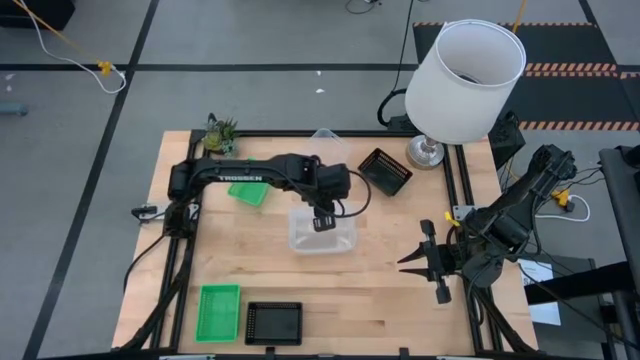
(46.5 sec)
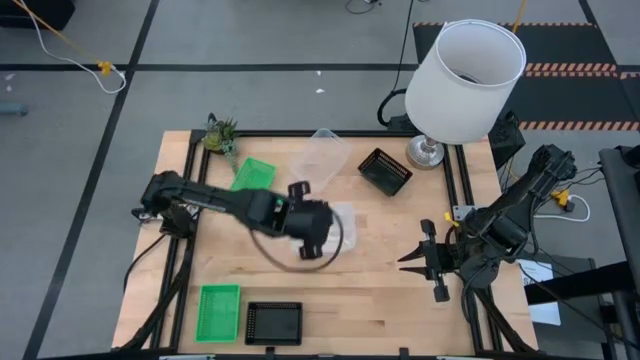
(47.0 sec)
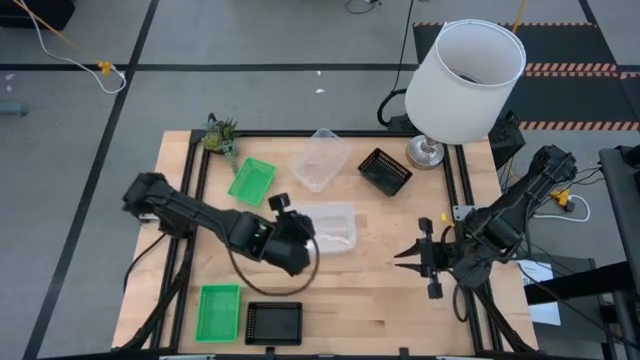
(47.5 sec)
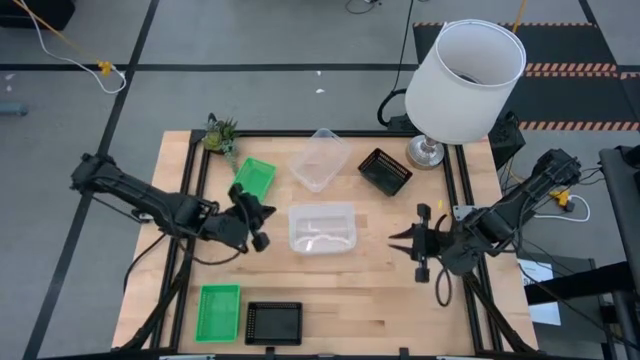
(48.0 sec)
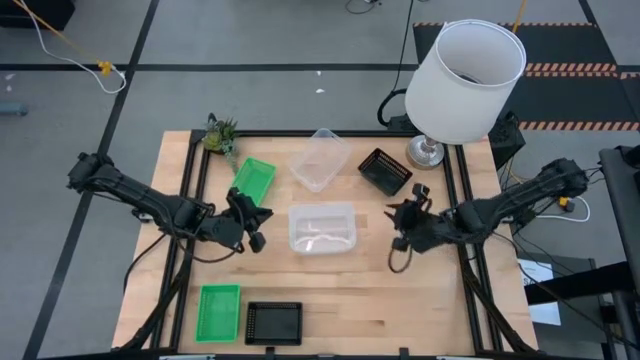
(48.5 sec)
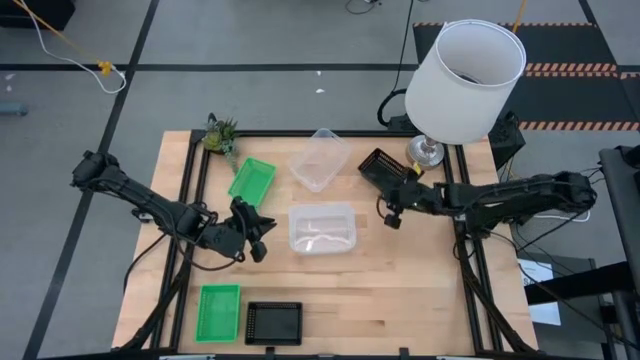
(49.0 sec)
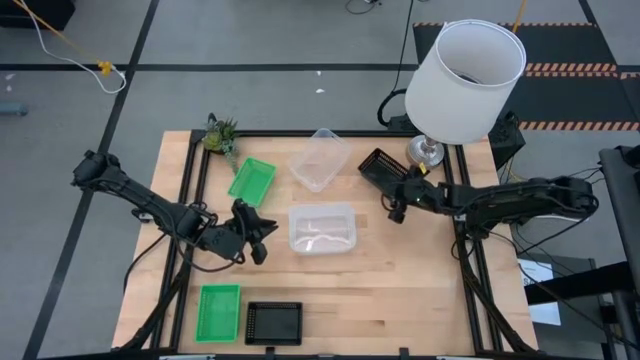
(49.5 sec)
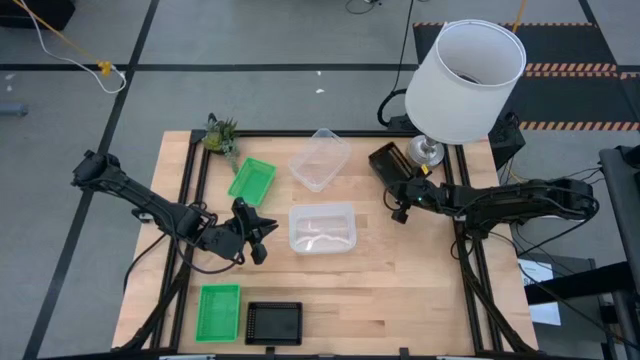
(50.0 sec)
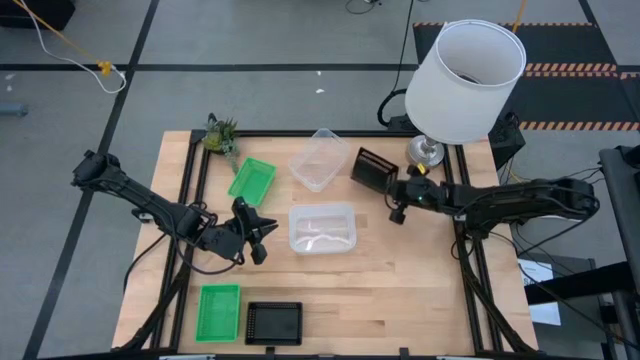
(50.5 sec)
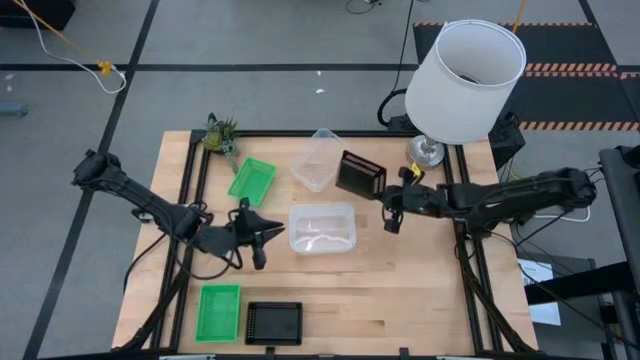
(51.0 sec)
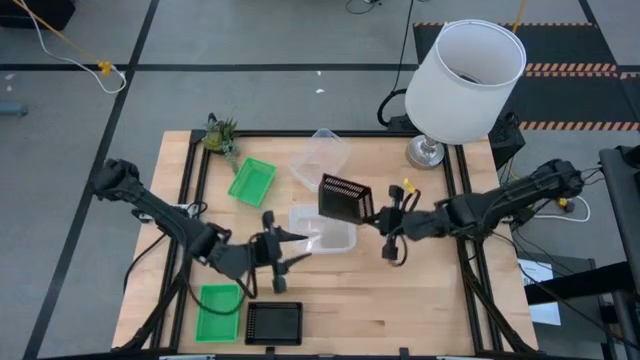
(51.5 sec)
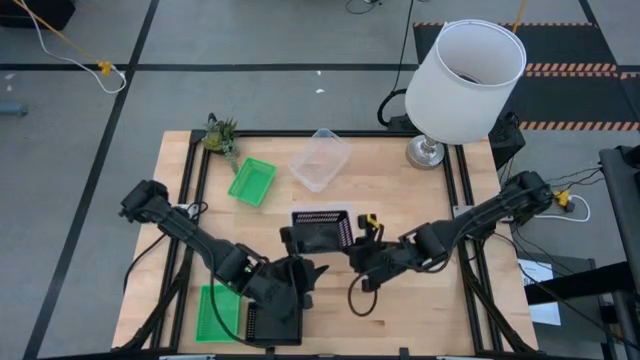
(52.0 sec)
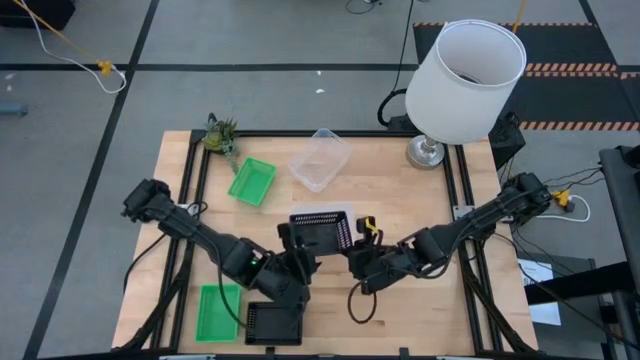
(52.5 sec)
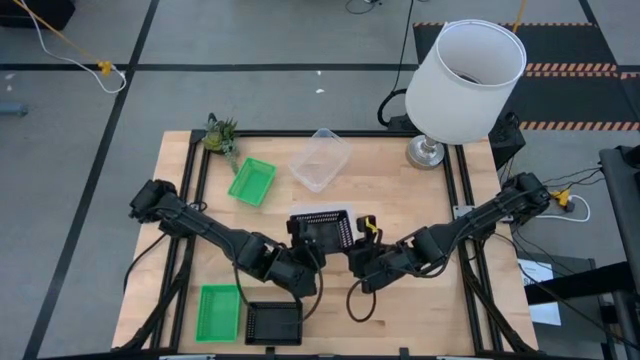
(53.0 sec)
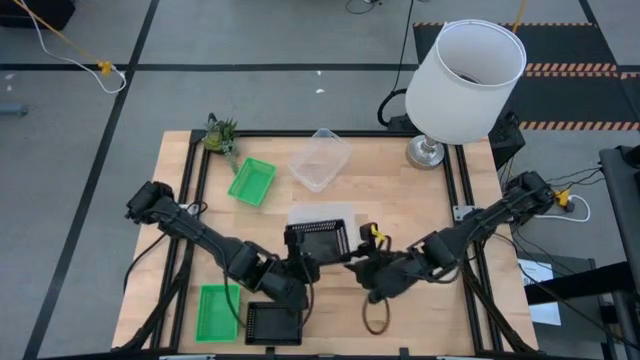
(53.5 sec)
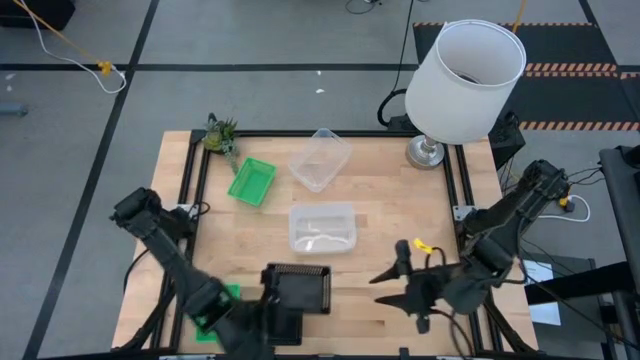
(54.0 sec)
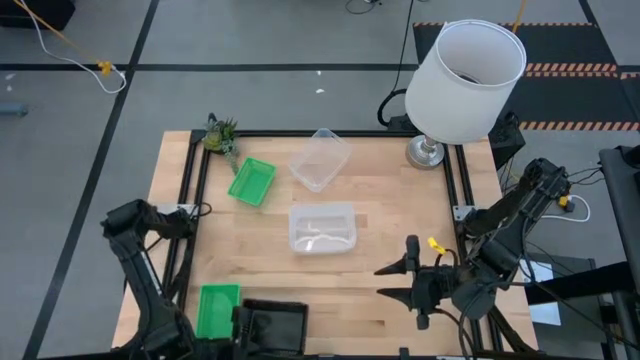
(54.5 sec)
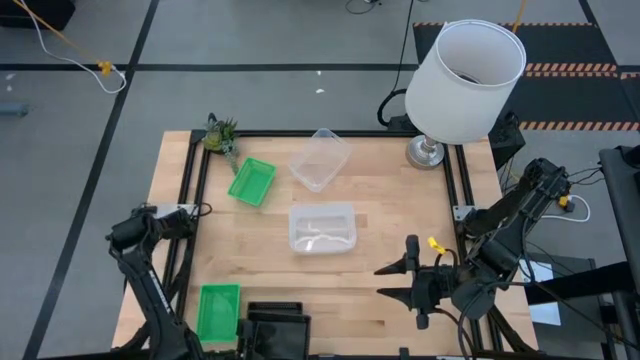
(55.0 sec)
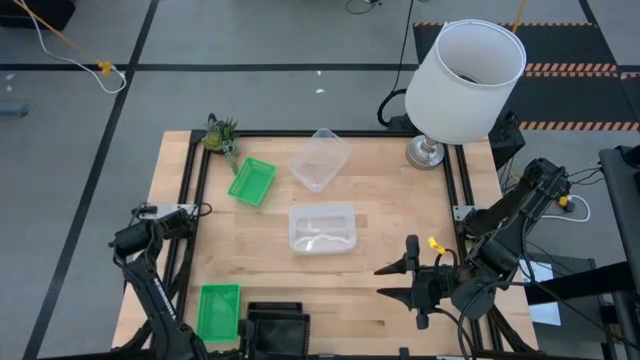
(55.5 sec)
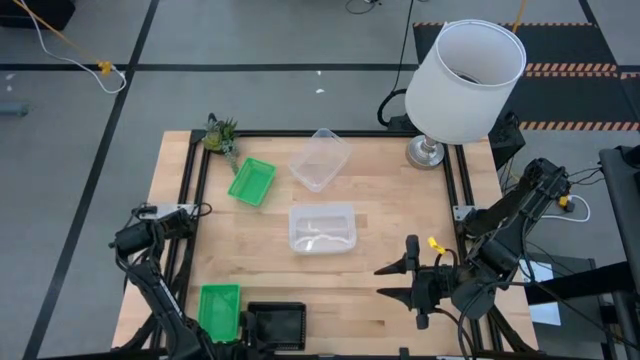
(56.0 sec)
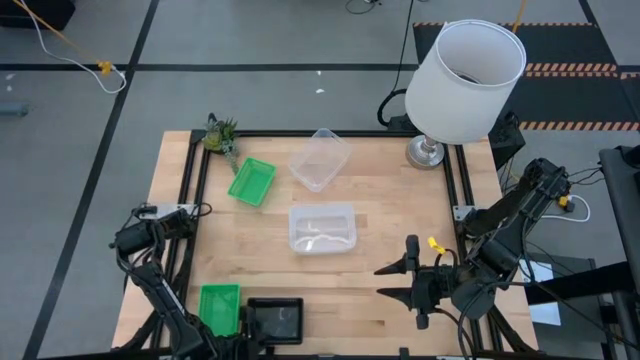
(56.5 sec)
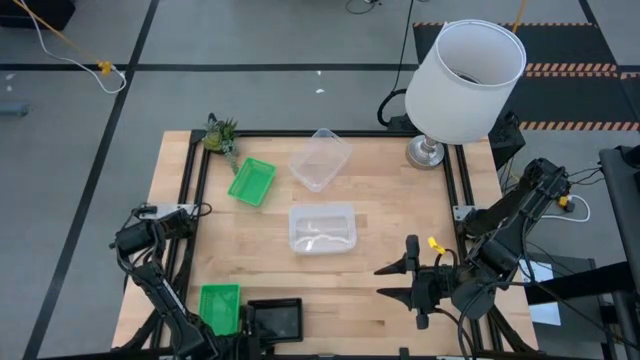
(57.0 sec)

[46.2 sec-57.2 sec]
Stack the top black bin on the bottom stacked black bins

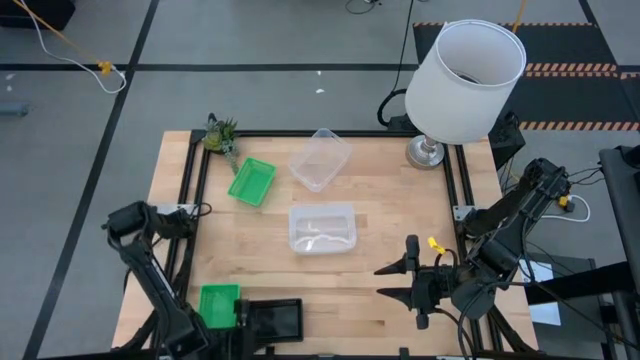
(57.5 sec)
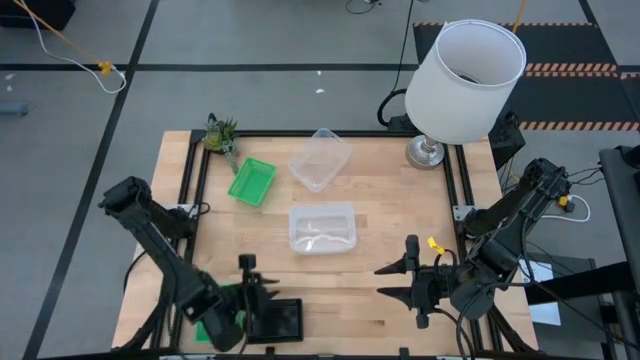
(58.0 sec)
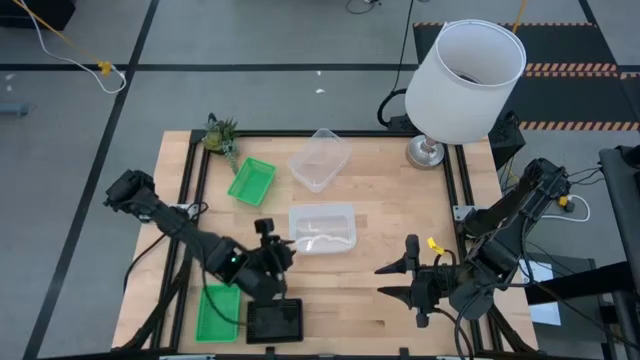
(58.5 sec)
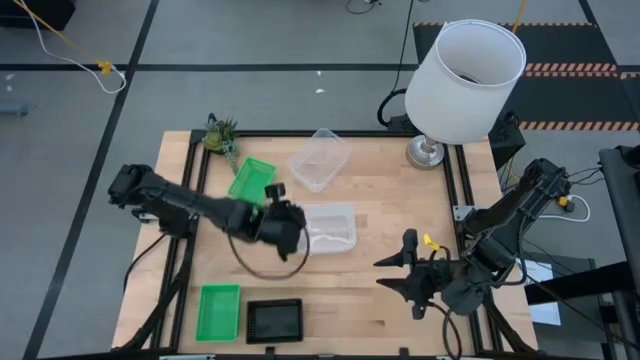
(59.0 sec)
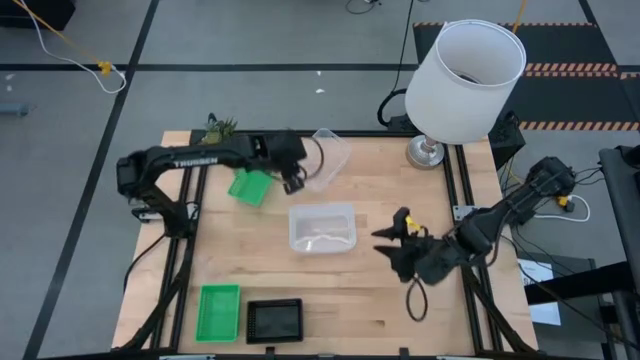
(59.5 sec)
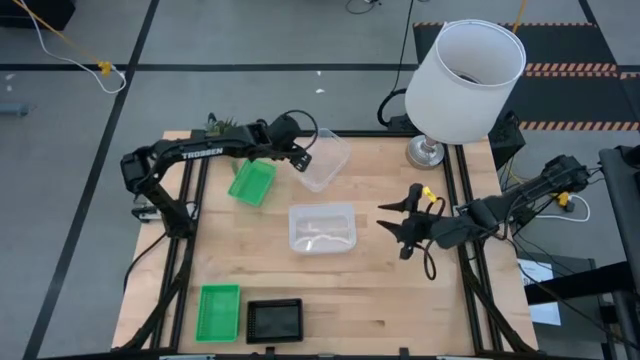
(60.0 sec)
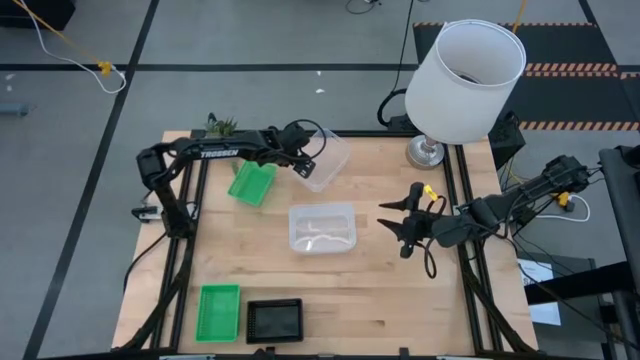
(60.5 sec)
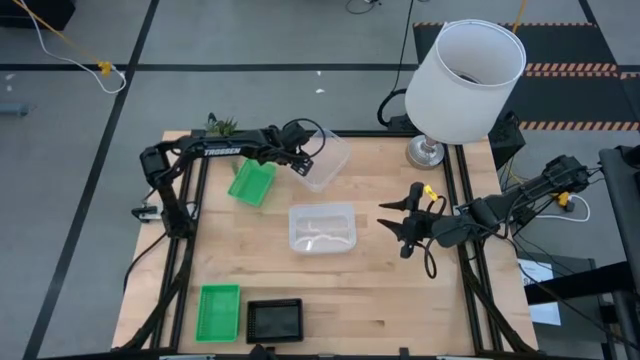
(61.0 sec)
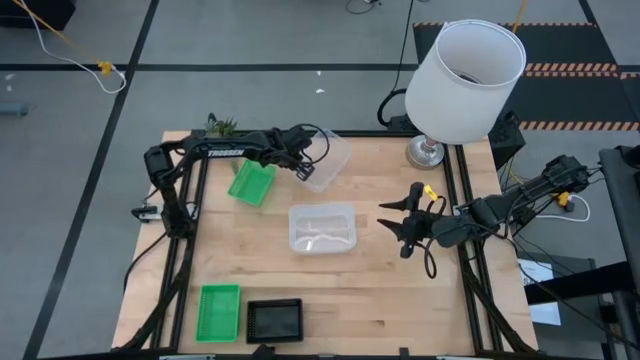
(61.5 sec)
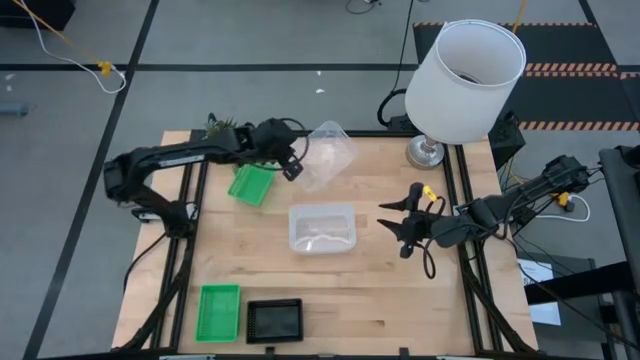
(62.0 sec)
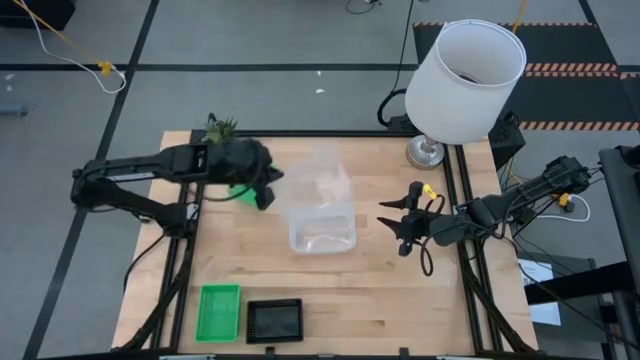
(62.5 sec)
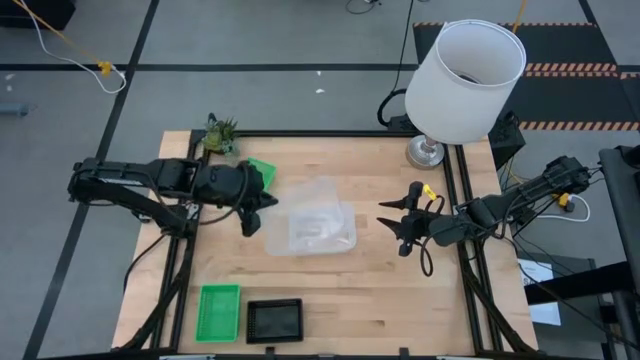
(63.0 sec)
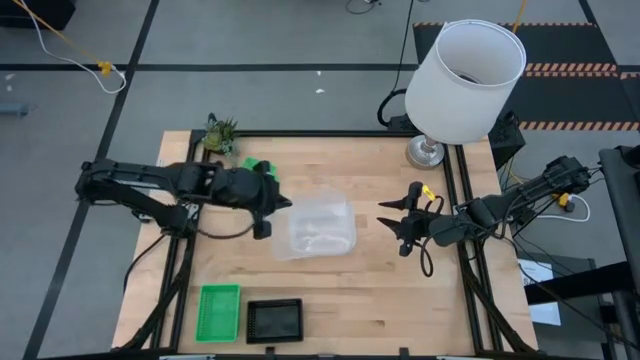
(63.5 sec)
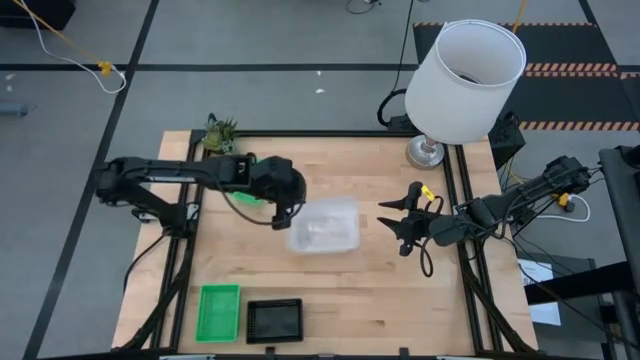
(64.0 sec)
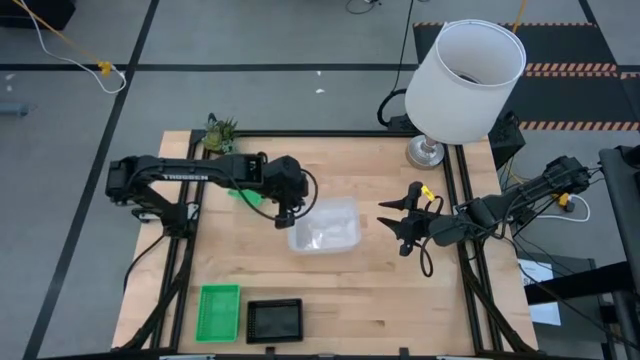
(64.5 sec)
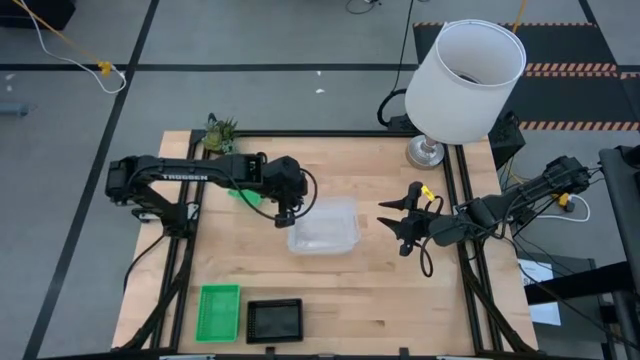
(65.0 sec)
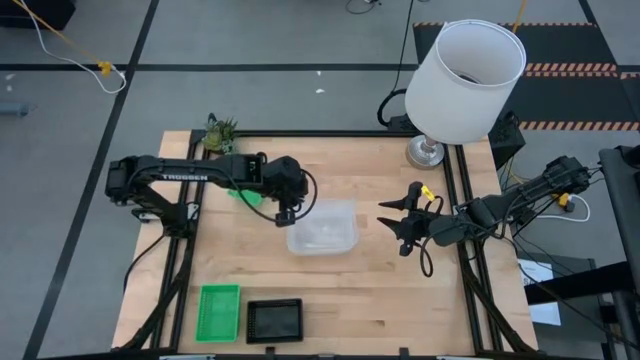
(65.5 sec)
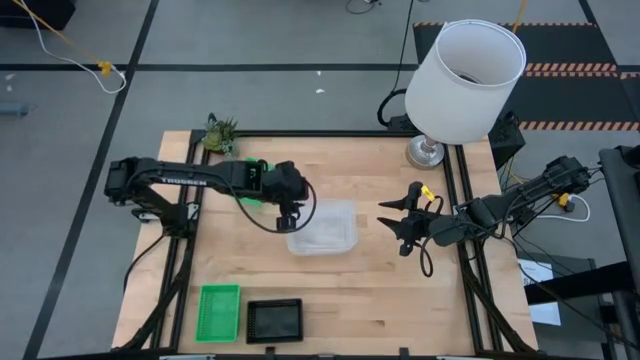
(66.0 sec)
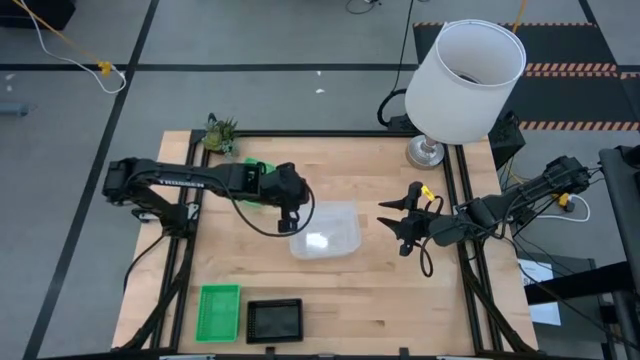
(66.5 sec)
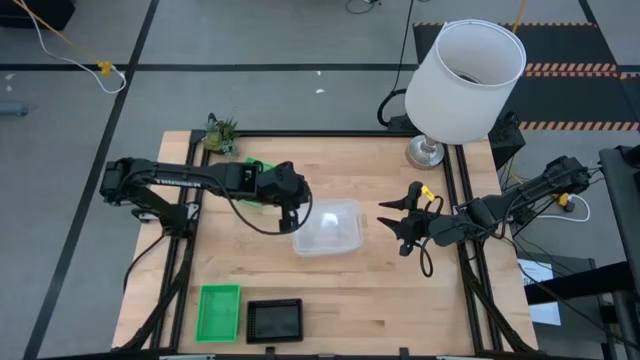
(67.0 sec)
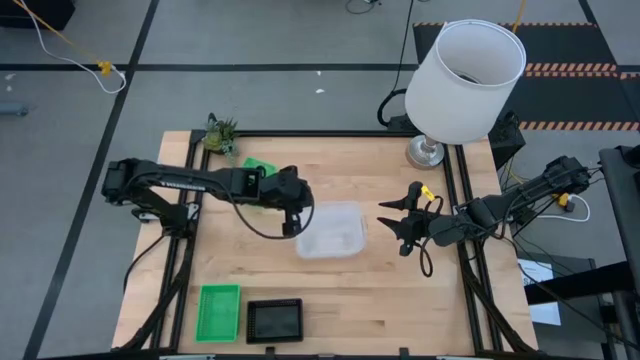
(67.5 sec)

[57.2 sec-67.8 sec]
Stack the top transparent bin on the bottom stacked transparent bins
